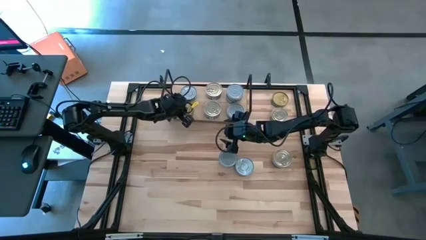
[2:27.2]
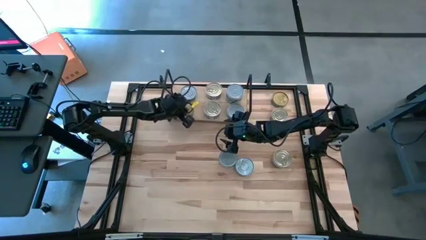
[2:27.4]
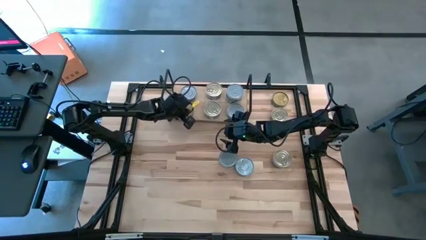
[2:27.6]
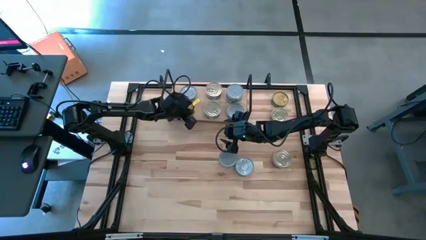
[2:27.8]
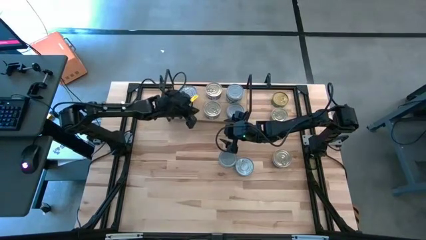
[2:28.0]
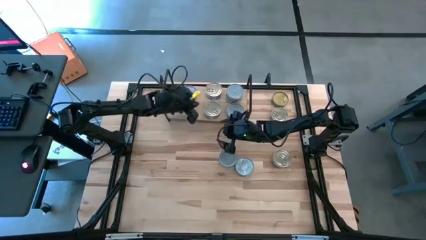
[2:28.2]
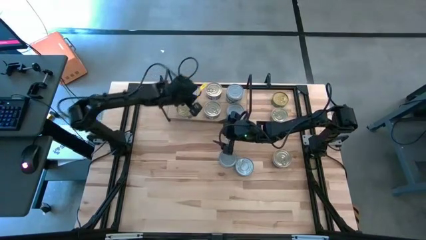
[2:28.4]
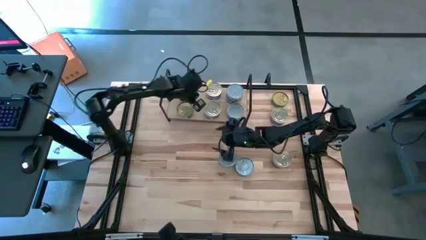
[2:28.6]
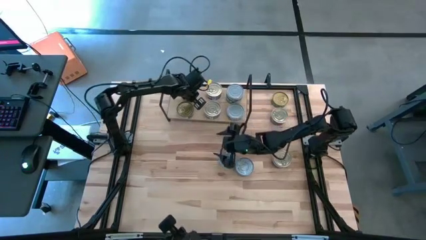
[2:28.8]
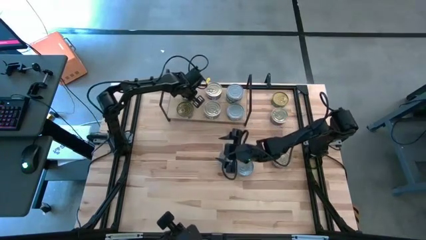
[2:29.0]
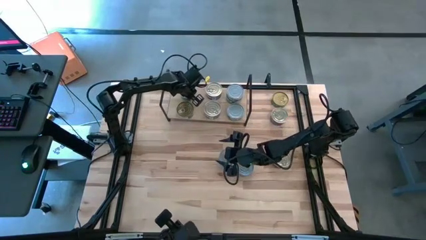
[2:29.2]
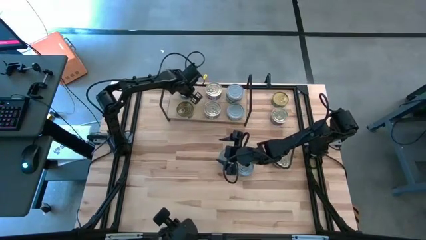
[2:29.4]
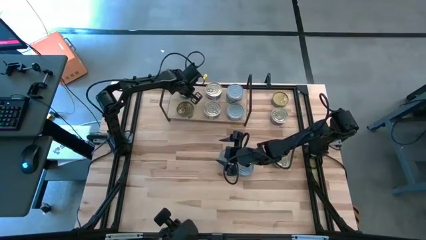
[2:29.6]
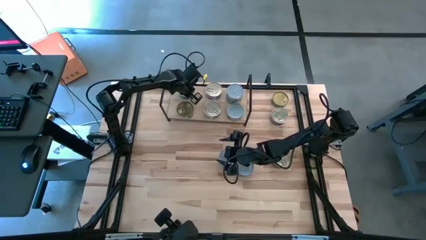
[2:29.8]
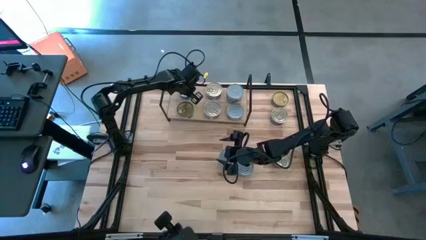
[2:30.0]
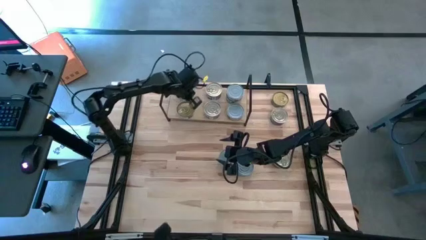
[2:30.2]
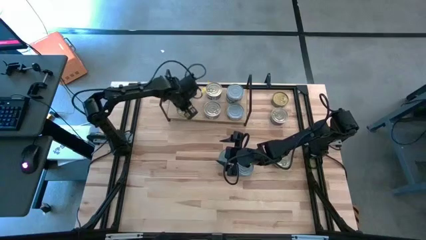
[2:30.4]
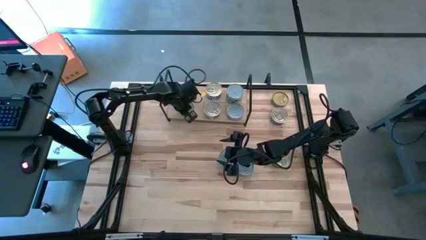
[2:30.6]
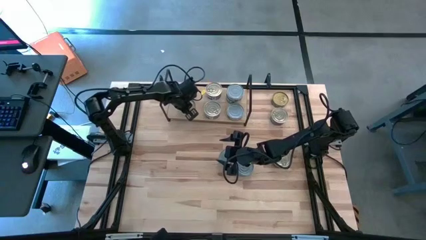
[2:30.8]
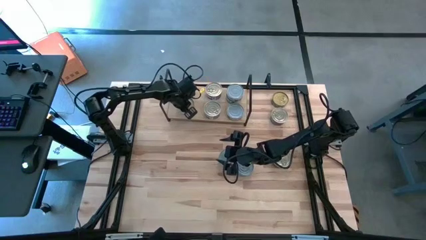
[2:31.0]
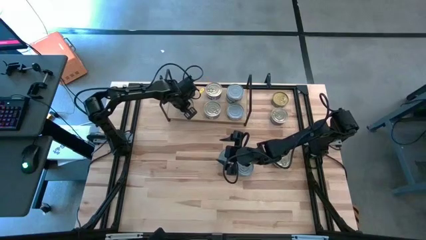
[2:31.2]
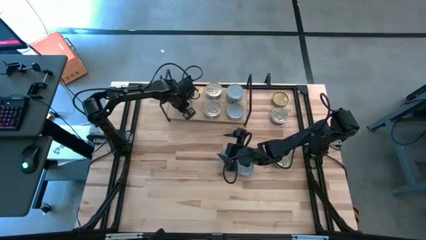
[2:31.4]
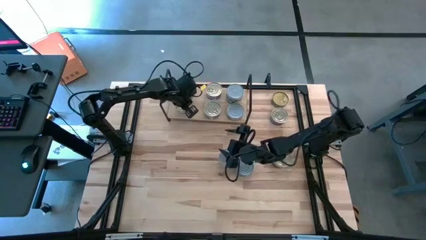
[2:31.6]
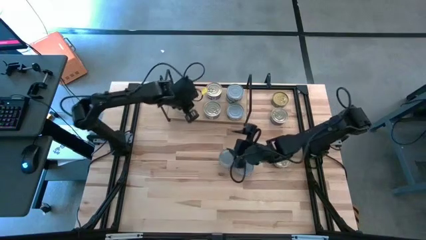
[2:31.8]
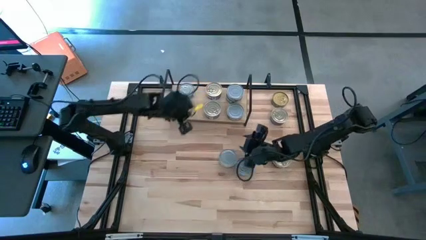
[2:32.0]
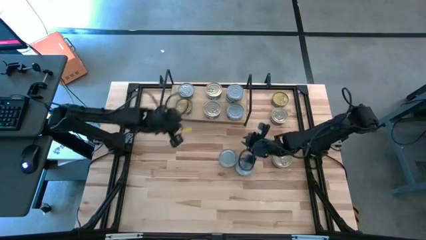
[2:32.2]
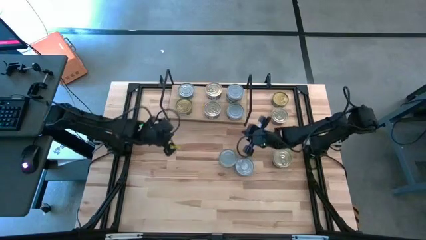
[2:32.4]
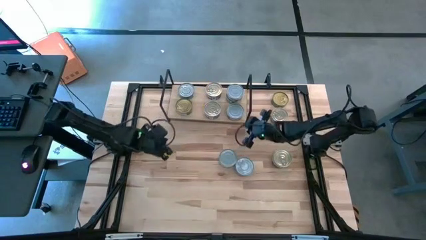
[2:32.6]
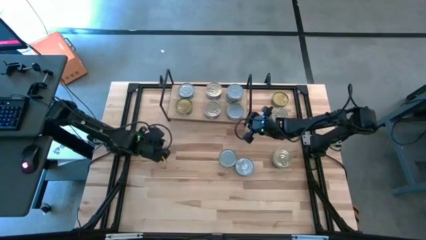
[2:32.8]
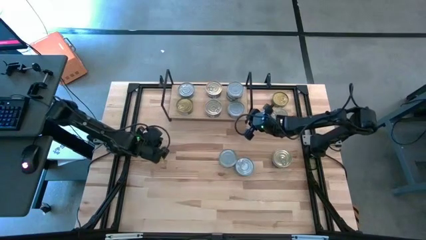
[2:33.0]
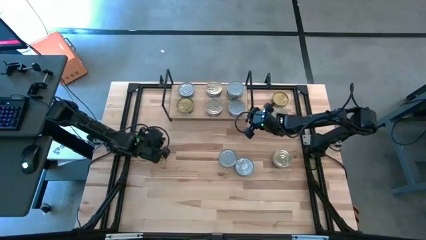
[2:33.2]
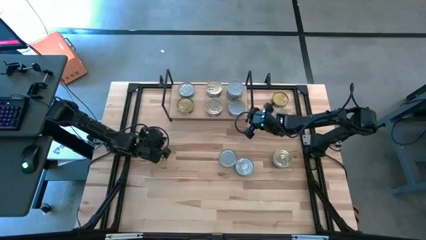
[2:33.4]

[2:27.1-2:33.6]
Task: Stack canned seafood by type on shelf
Adjust the tuna cans and the shelf on the table

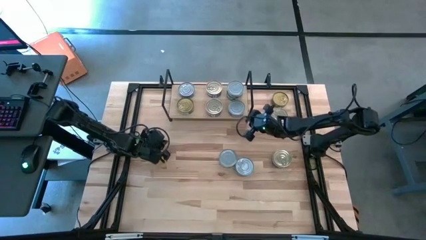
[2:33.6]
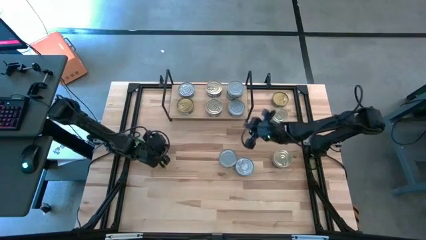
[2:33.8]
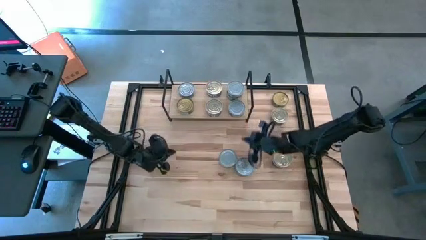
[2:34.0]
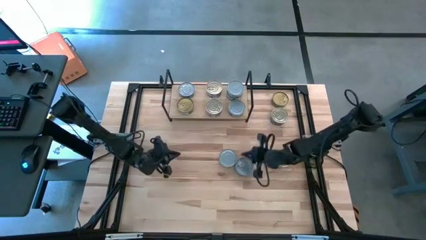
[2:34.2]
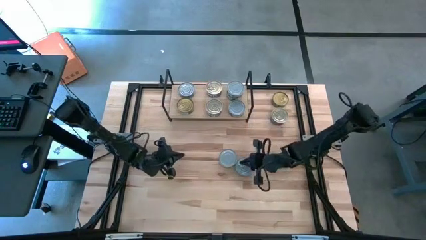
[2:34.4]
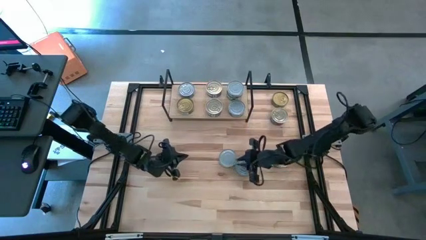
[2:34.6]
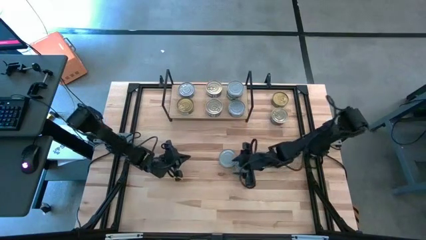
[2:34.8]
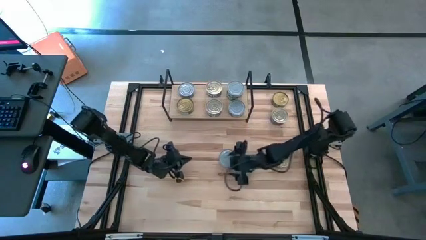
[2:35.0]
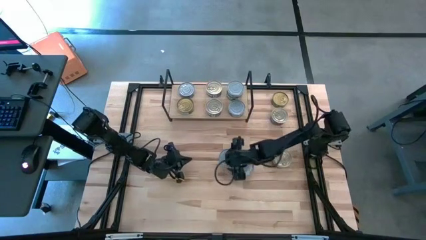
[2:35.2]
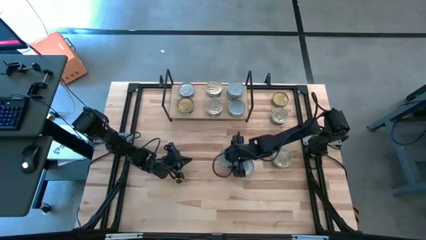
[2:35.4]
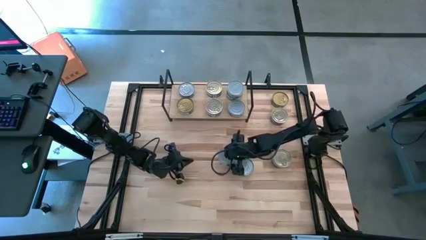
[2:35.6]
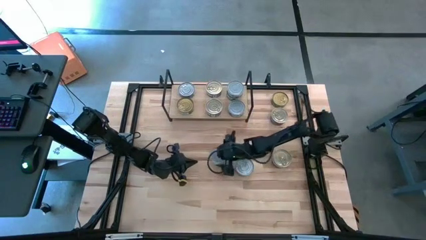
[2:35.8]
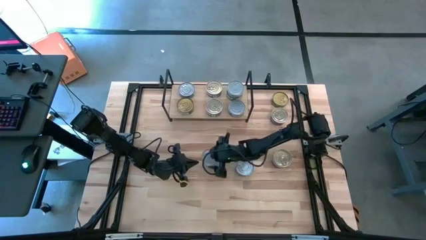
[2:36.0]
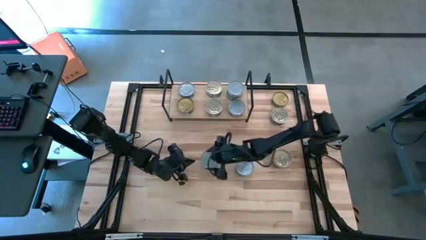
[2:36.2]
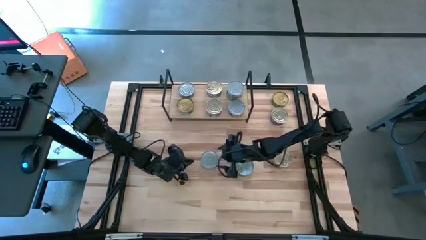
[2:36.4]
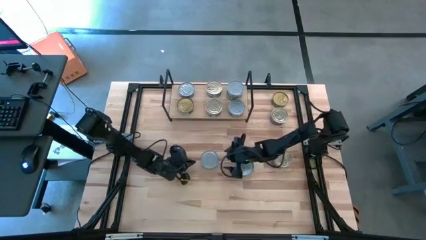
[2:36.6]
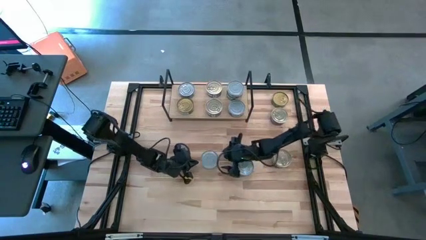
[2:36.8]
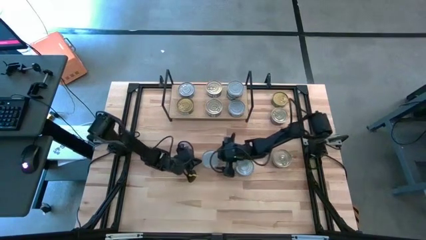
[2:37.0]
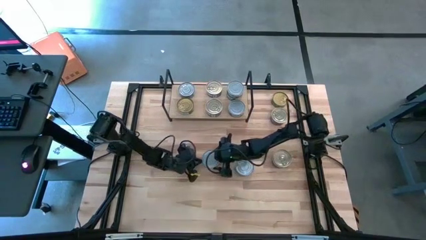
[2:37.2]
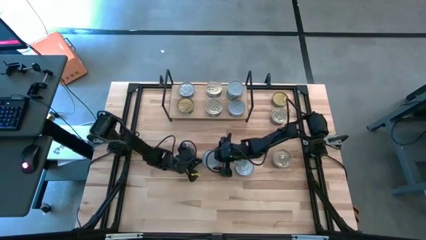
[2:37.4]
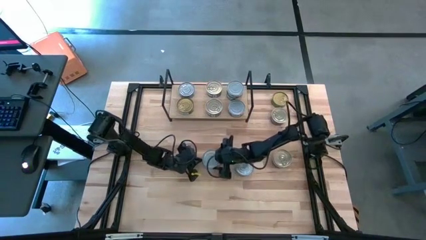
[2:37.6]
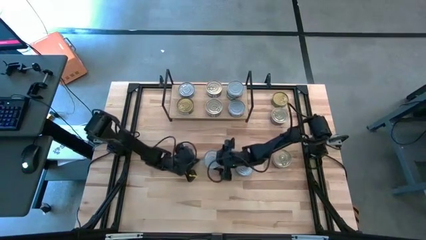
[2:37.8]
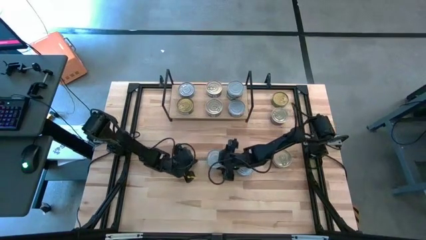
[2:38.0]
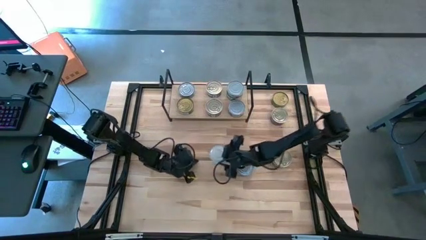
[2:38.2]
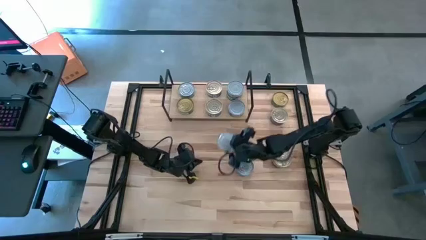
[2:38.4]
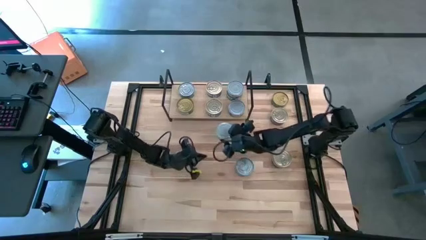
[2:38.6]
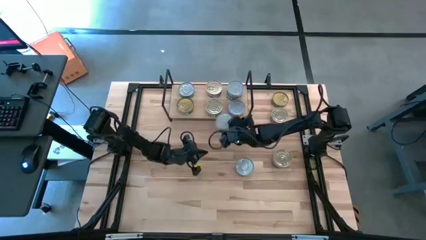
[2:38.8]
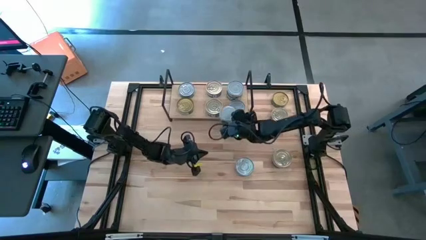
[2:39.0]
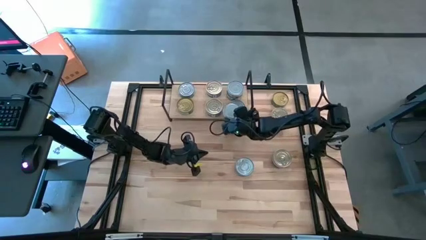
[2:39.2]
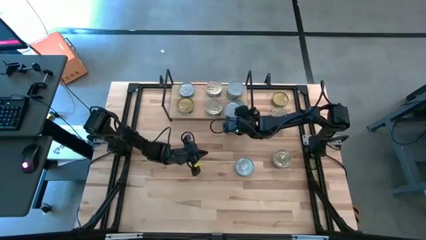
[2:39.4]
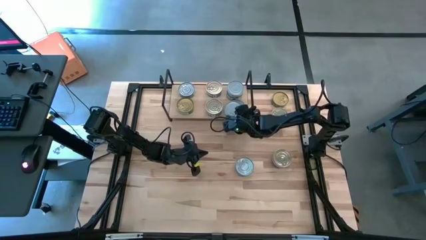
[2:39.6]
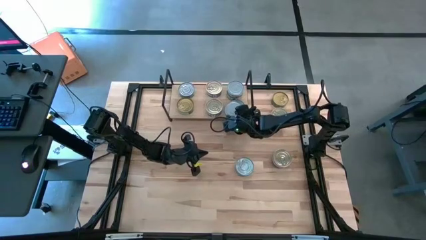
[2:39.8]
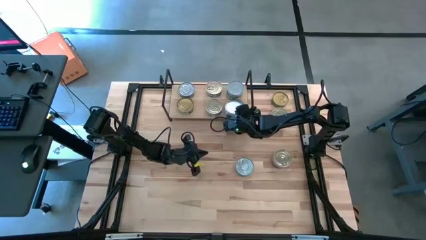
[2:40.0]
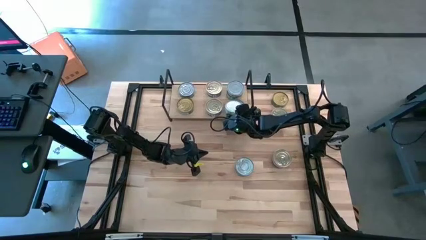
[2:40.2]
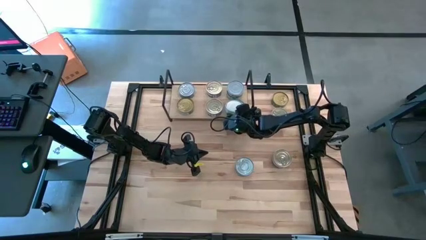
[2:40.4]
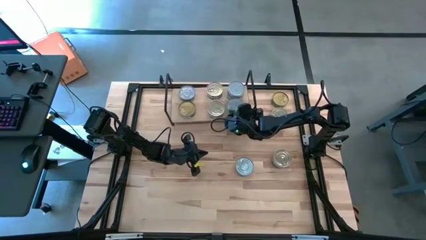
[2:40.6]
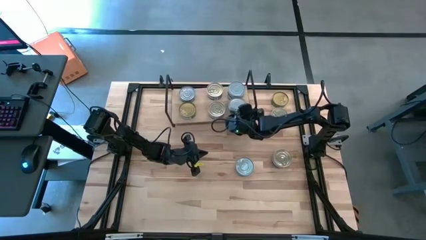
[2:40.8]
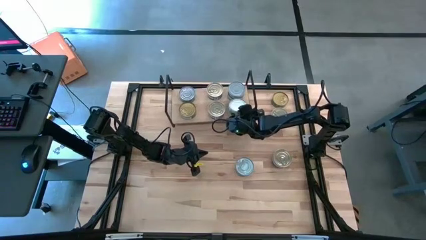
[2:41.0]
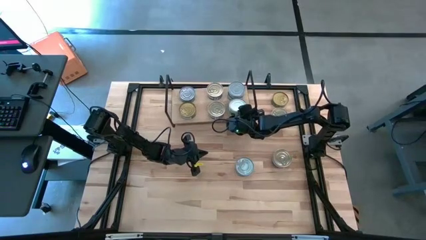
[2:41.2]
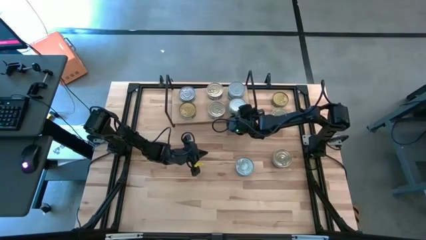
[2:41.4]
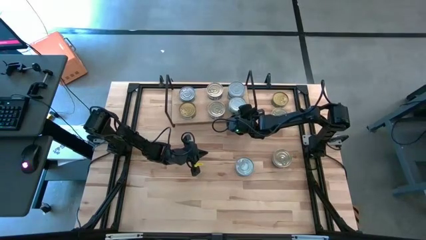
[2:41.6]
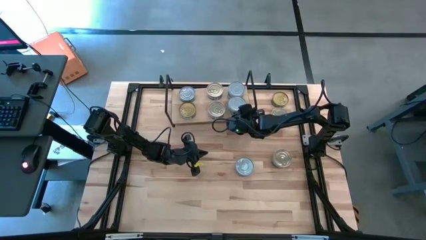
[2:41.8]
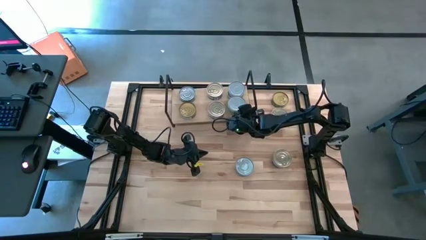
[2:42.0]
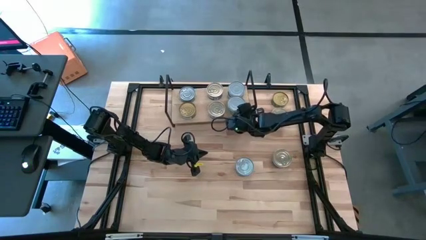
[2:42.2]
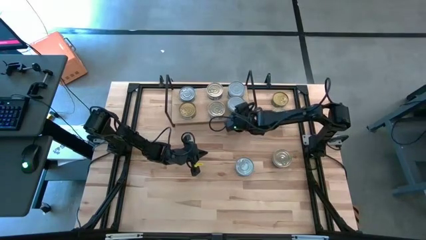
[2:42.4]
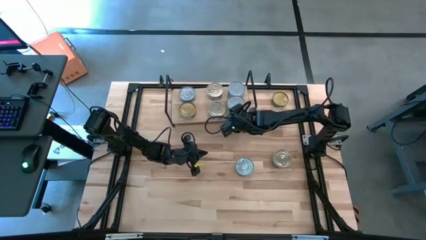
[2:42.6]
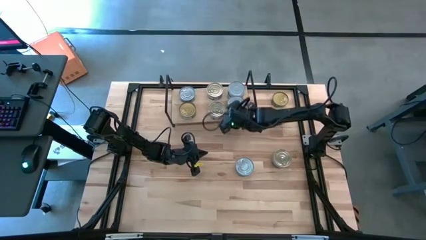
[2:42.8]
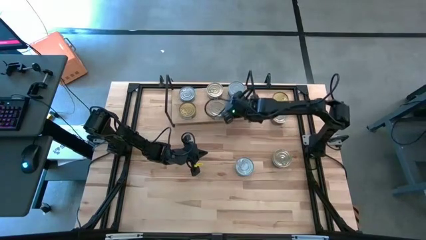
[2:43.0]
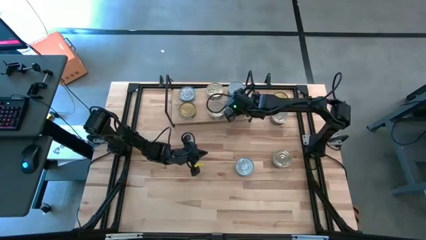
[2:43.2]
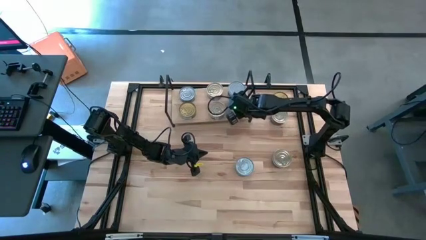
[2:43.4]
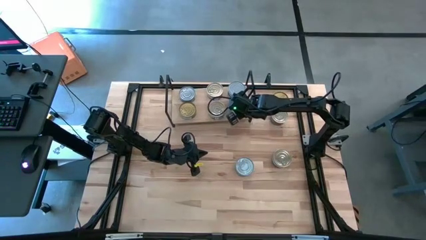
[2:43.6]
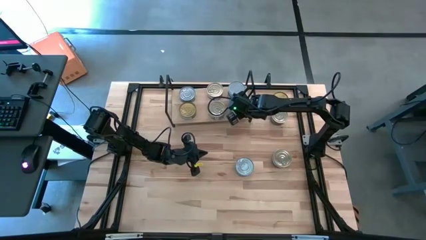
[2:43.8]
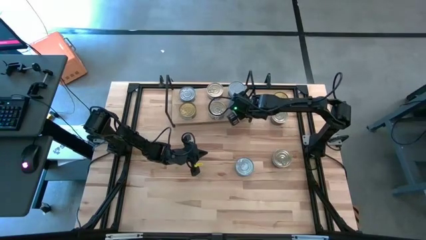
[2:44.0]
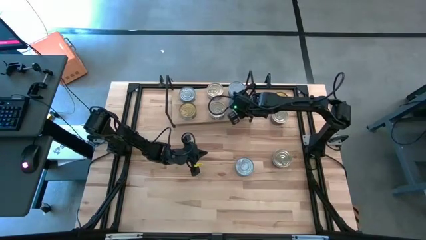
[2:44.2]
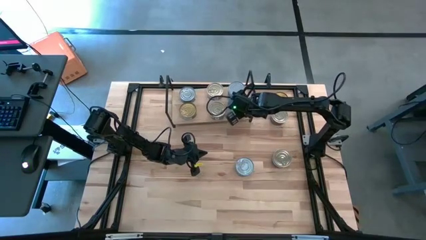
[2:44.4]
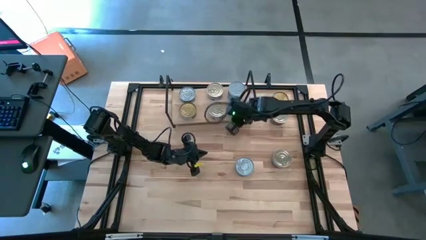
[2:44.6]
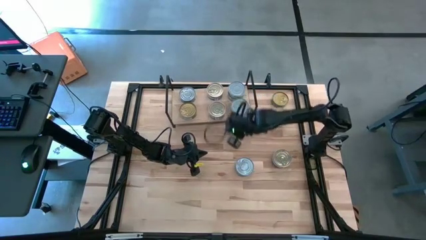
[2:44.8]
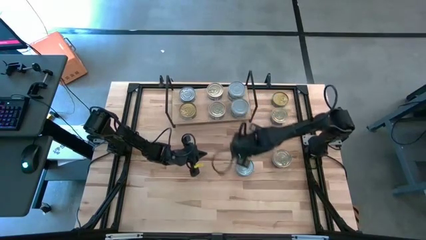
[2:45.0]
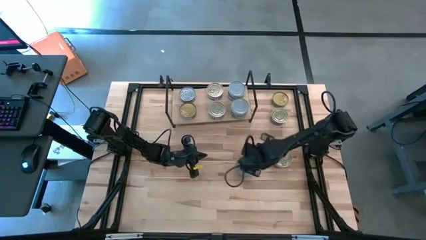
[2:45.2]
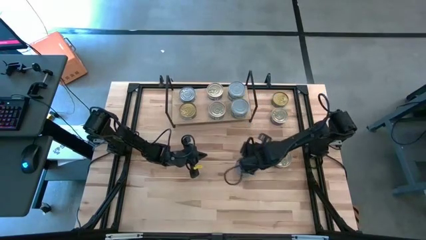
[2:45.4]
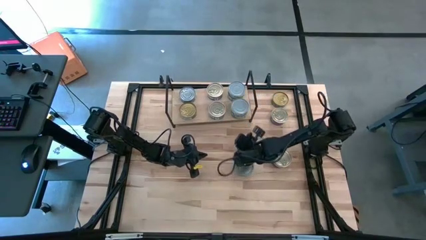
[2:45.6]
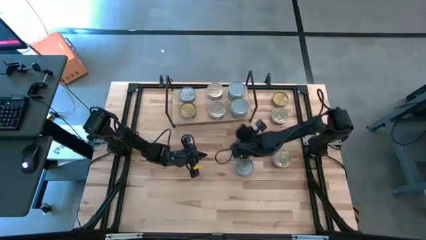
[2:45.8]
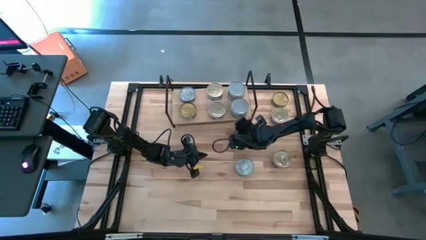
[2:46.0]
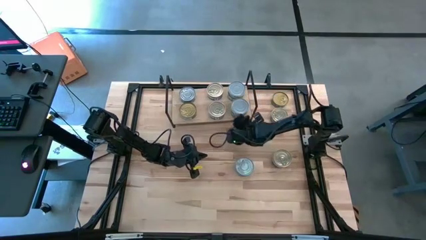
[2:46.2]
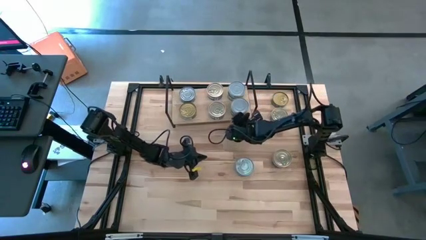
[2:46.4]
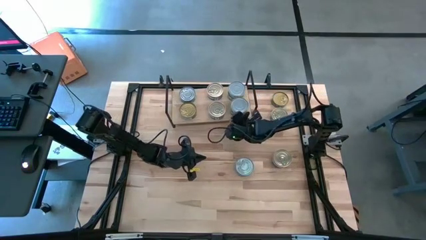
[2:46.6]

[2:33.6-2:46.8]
Stack the green-white tuna can on top of the green-white tuna can on the shelf
